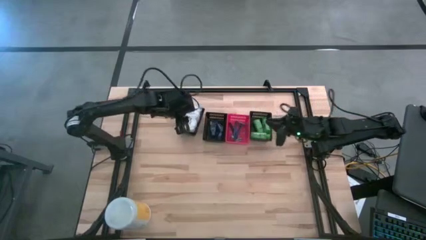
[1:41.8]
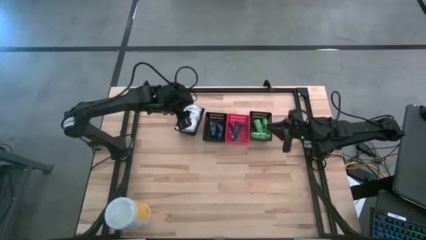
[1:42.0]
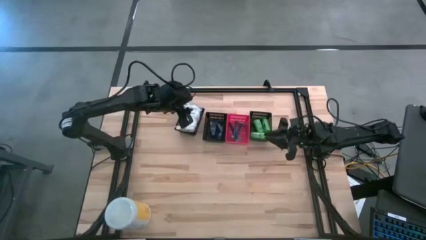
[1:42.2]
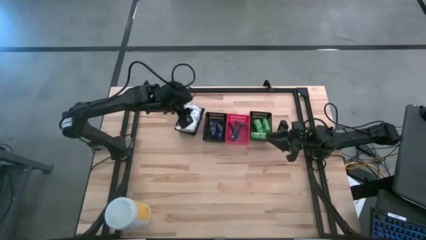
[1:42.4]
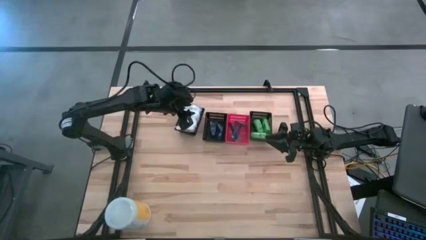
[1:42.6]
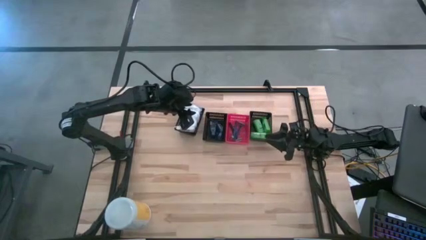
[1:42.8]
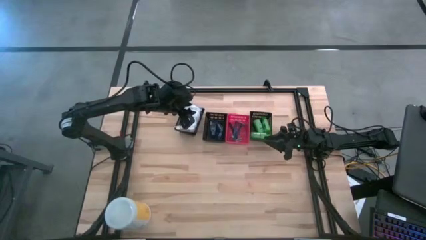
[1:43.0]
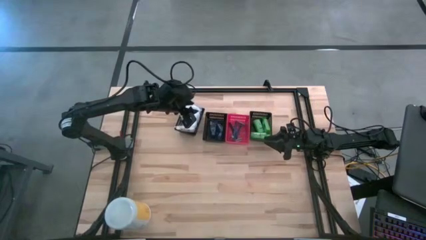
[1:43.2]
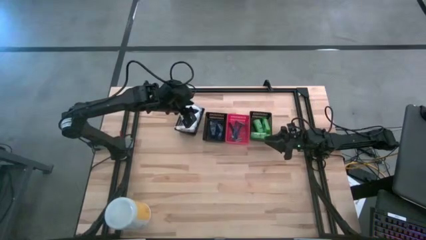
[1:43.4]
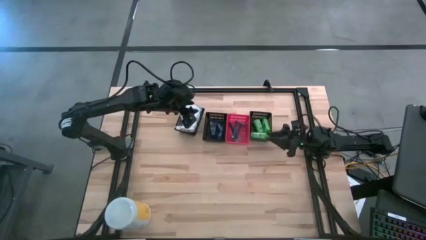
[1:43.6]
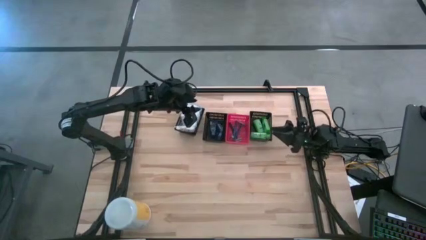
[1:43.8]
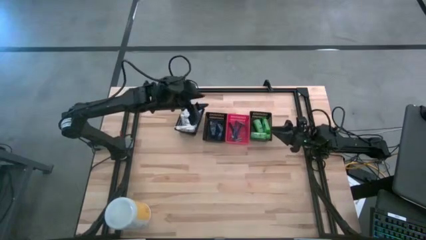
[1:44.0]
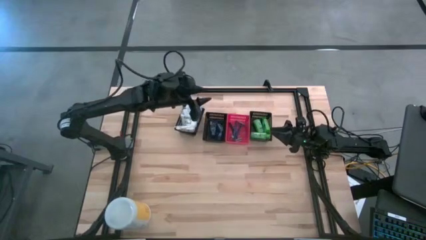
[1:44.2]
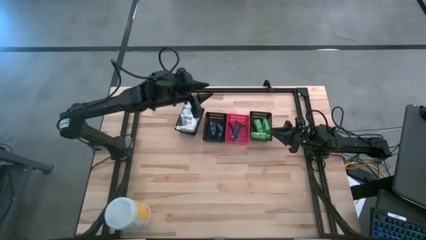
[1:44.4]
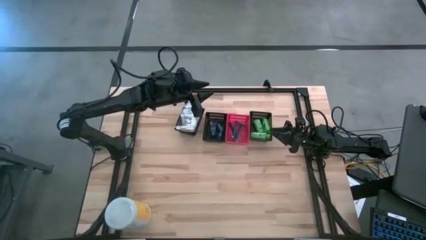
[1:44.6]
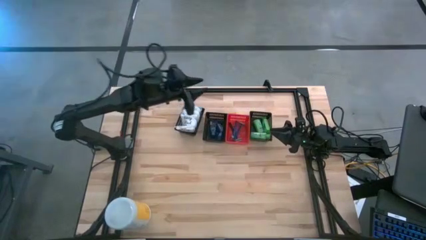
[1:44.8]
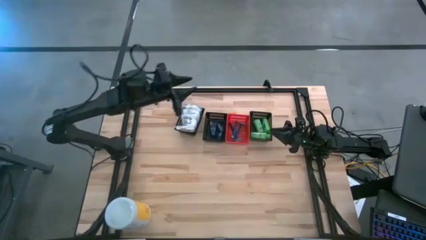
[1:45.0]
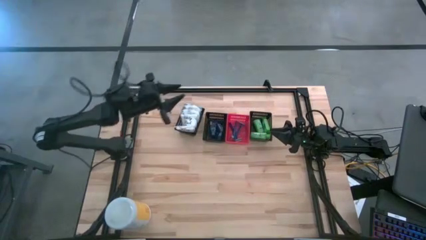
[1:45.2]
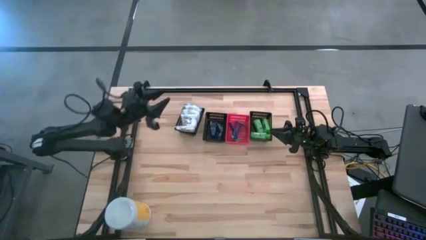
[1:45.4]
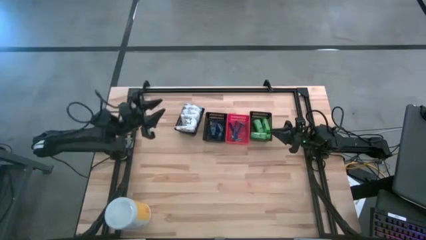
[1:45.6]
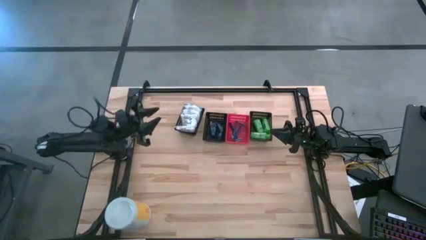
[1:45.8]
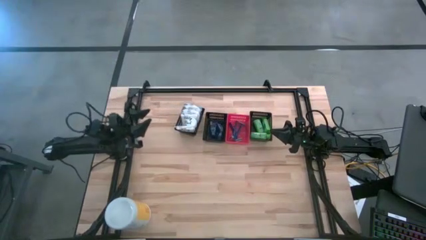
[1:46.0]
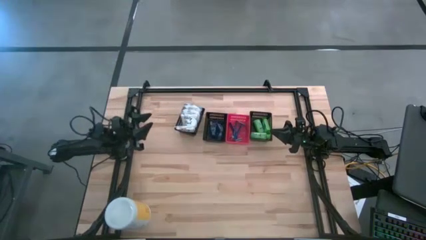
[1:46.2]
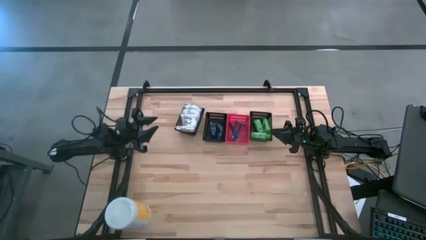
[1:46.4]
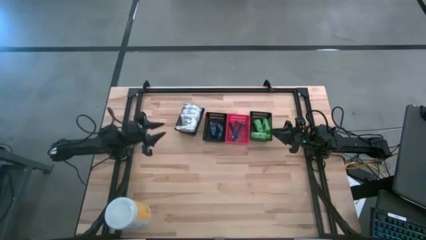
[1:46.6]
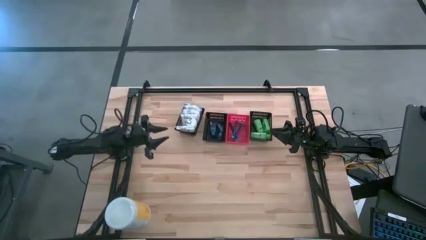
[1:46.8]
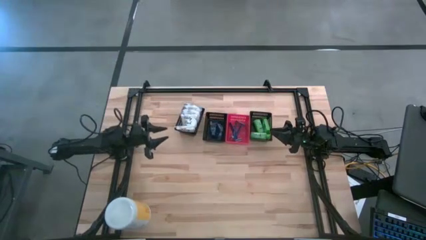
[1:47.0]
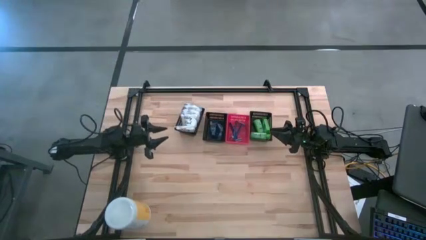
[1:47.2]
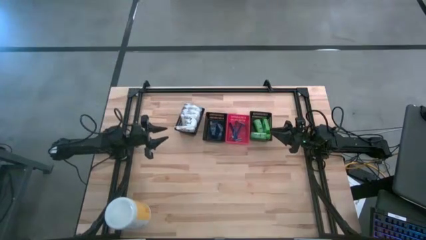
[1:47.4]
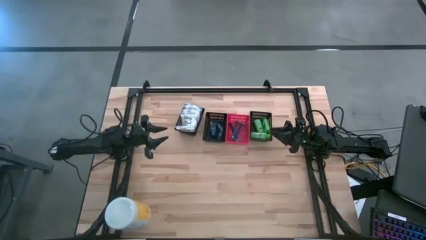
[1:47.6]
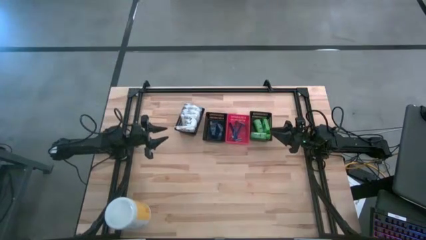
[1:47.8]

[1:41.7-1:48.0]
Task: Pick & Place Travel size toiletries
Return to Home Position

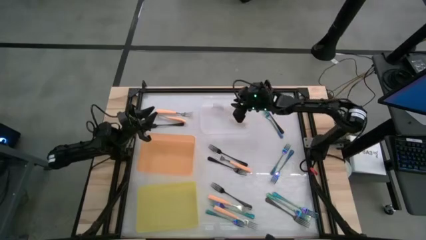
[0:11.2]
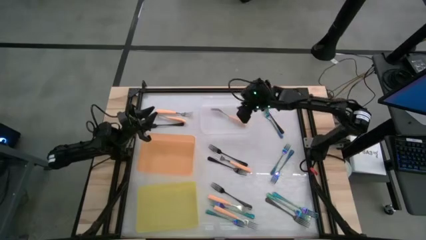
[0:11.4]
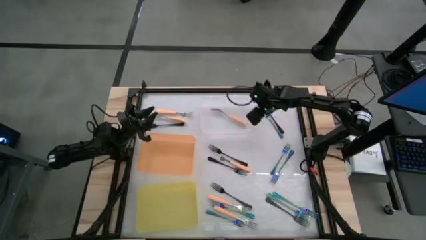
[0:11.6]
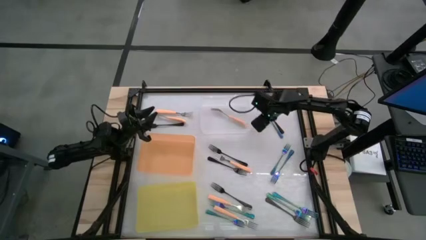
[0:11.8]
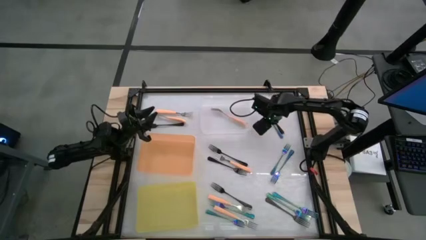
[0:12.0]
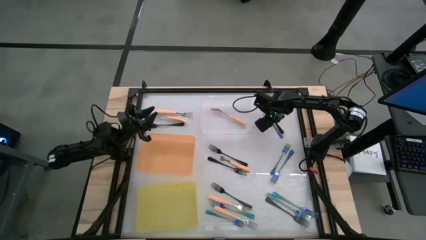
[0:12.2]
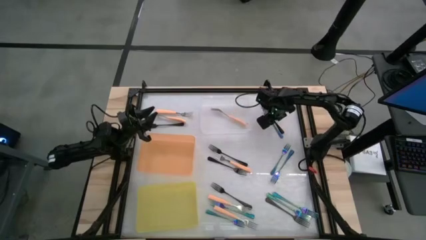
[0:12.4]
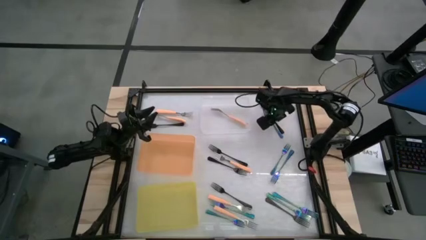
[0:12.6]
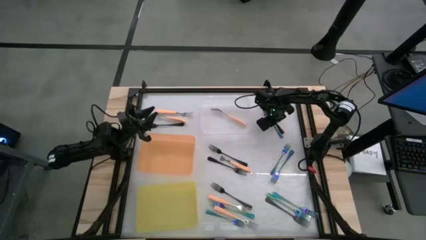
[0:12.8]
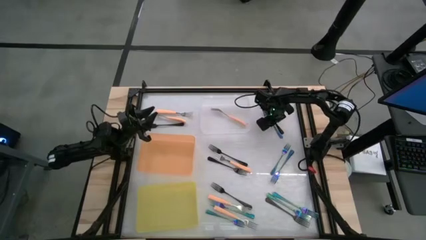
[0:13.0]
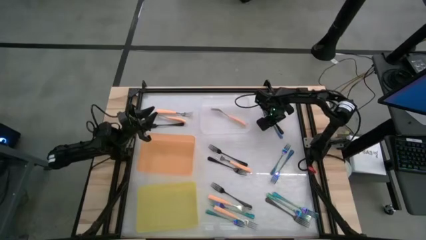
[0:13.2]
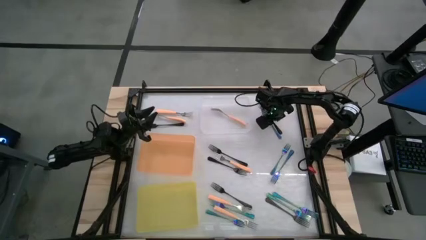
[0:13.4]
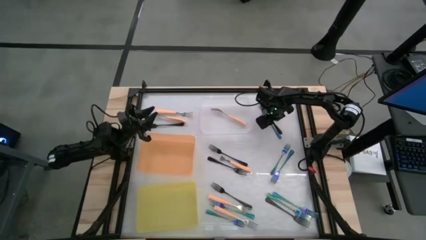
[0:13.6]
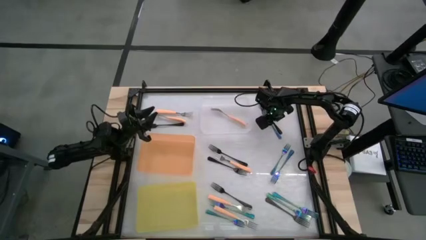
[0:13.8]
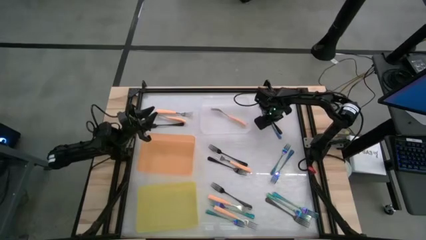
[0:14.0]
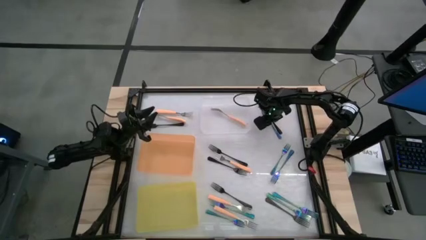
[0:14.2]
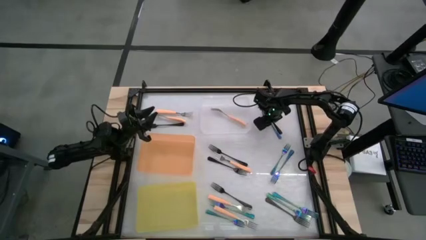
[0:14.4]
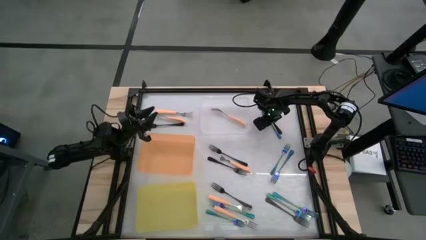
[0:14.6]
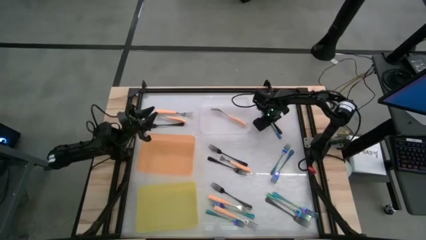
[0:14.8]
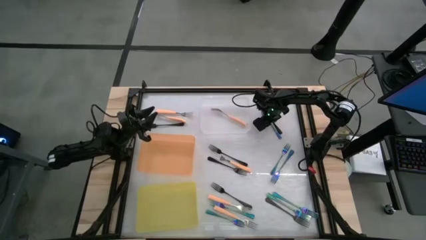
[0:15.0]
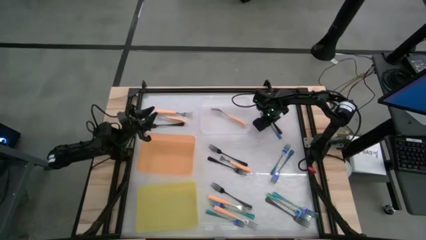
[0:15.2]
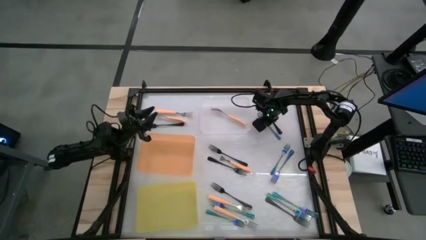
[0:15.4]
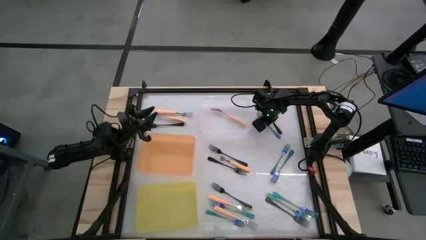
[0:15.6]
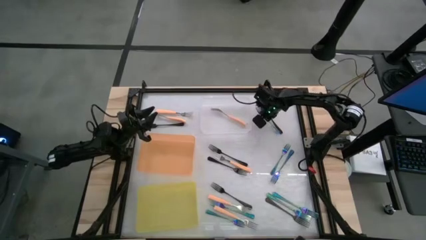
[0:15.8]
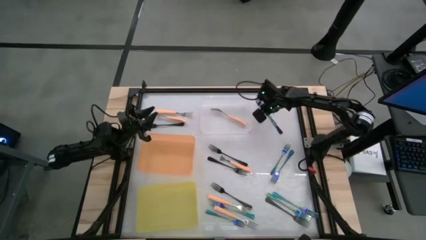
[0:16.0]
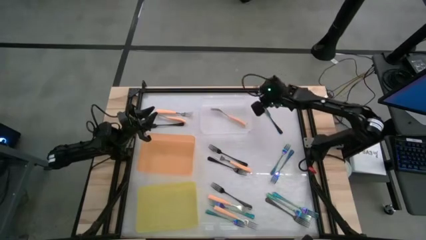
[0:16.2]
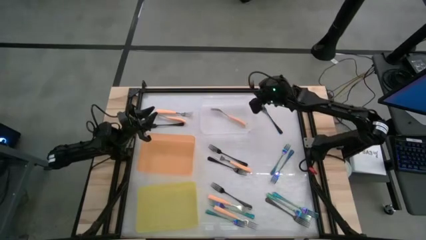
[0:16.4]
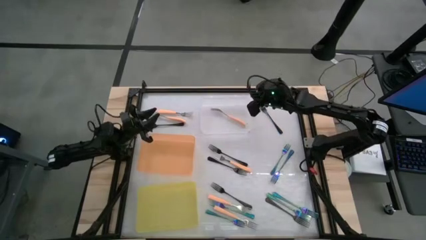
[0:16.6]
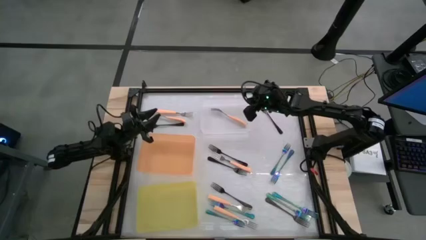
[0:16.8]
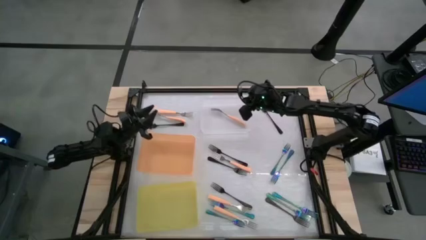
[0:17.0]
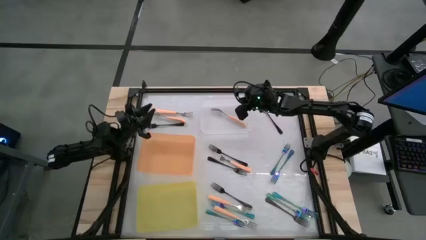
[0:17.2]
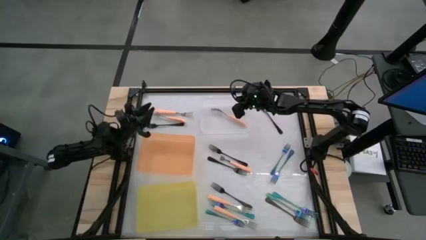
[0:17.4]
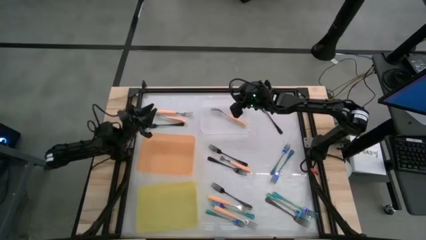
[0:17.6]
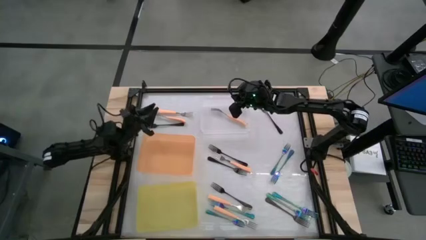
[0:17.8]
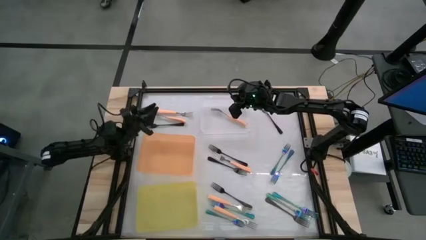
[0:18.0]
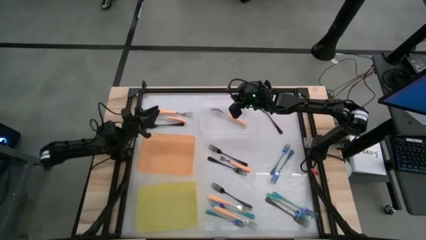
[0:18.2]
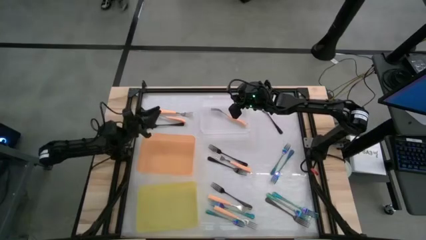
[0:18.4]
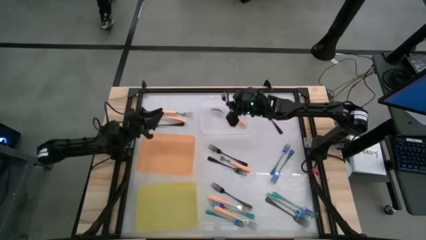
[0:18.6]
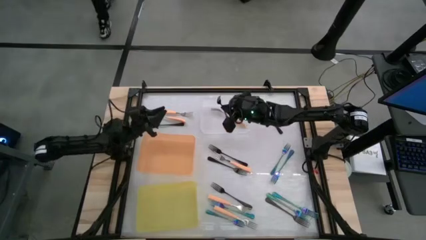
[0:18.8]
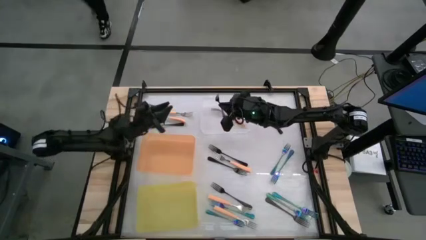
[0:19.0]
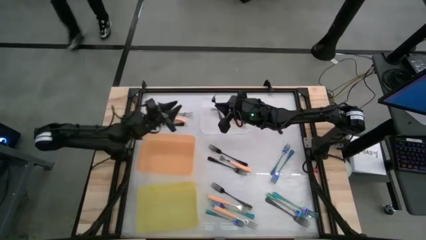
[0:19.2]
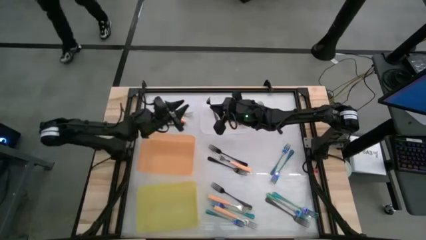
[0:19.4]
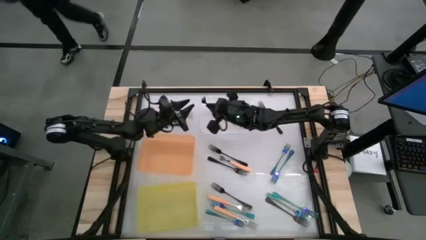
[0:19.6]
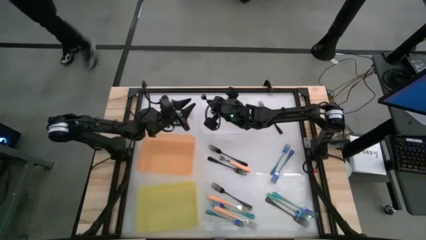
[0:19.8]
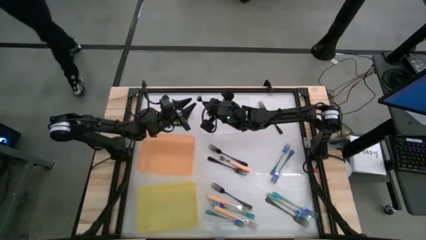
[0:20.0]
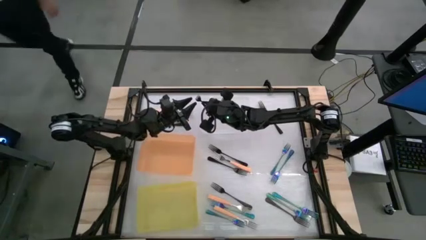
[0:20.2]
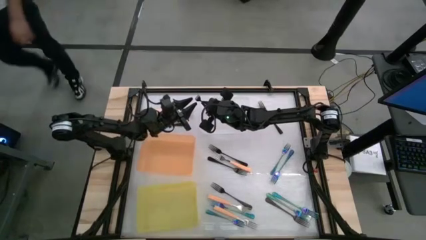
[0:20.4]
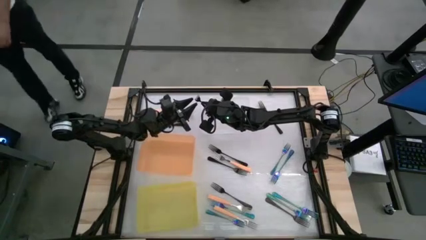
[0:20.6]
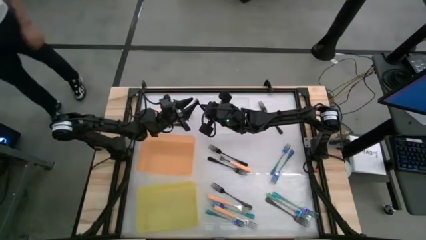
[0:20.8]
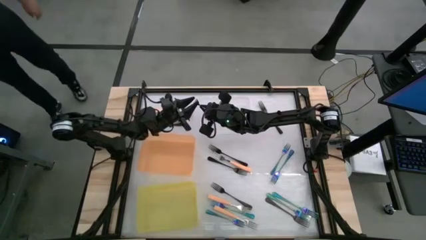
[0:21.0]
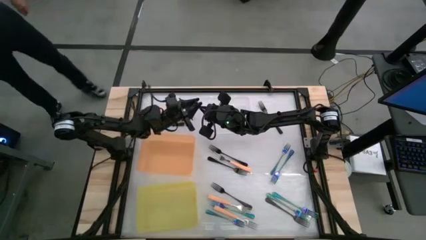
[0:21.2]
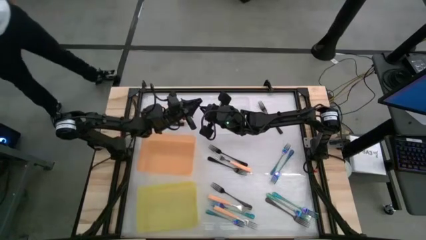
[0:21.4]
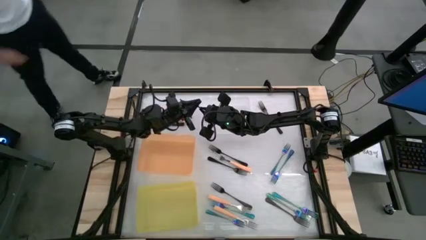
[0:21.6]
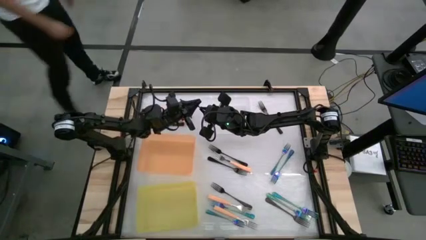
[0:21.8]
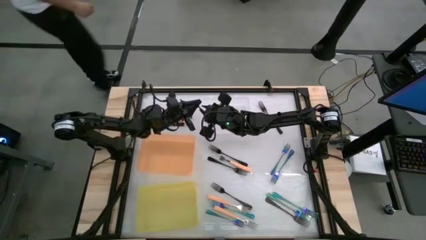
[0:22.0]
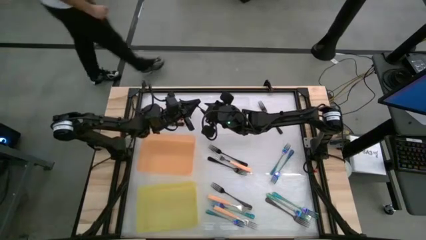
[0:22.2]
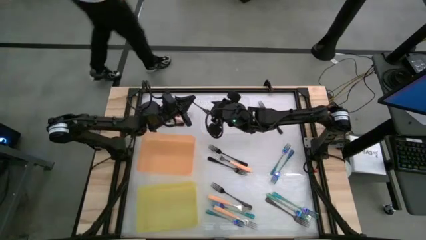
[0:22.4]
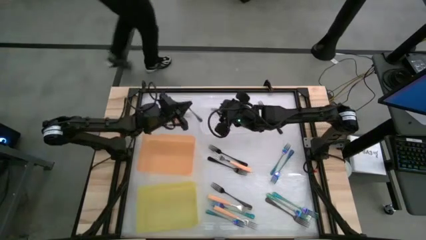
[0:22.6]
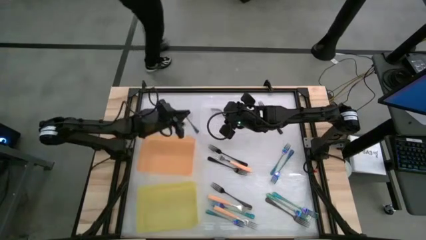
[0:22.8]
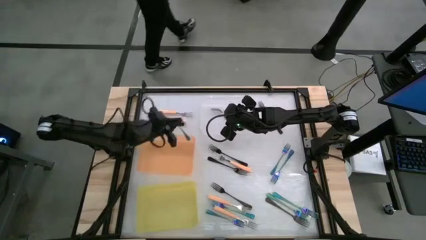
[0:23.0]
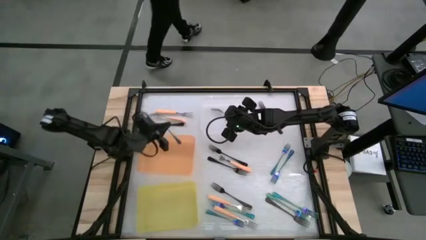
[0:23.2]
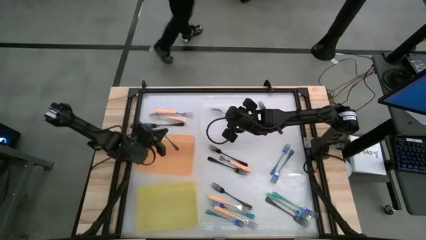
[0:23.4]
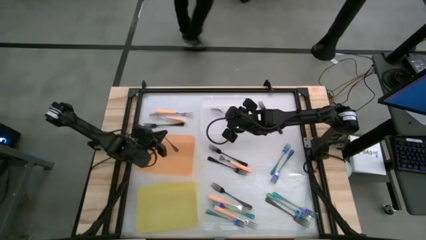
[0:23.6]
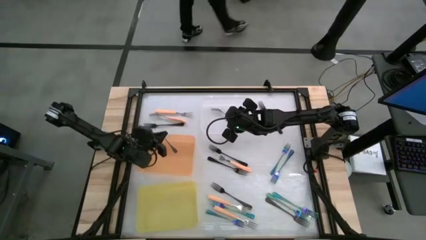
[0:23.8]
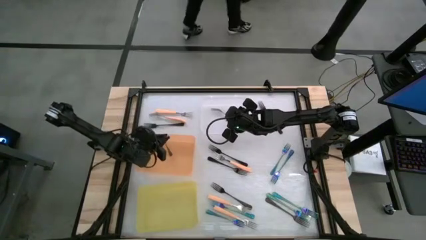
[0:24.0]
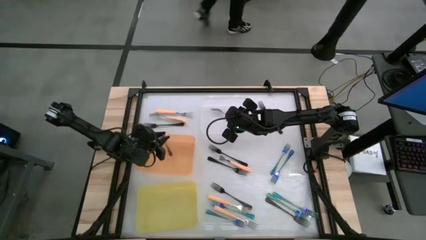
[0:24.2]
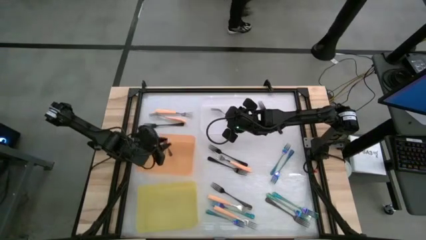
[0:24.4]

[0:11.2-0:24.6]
Task: Sort silverware by color (type)
Put the blue fork into the orange bin
